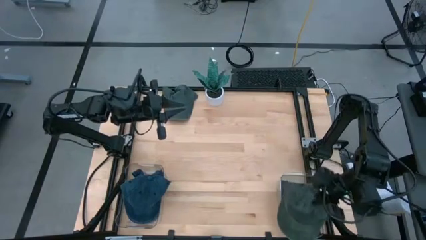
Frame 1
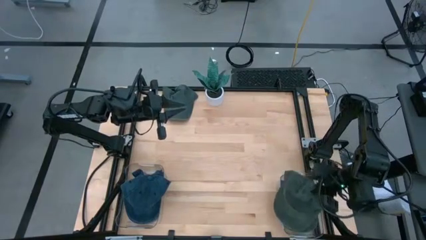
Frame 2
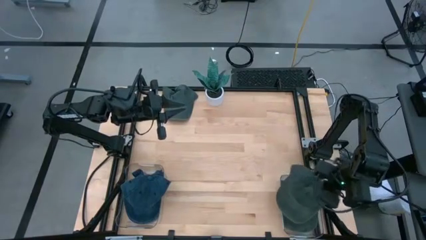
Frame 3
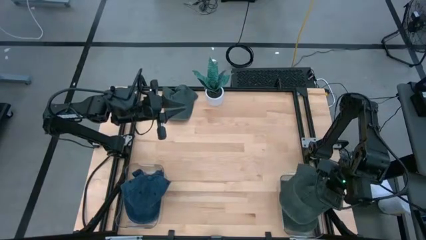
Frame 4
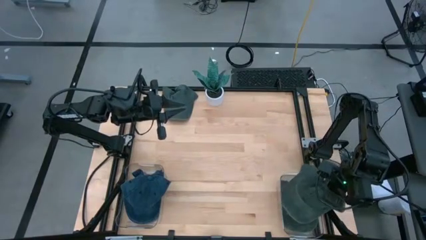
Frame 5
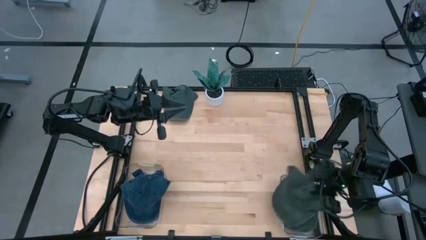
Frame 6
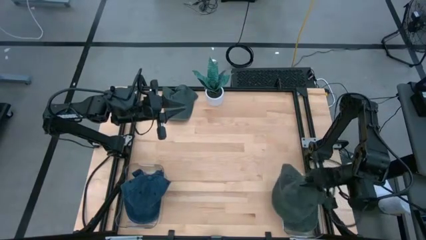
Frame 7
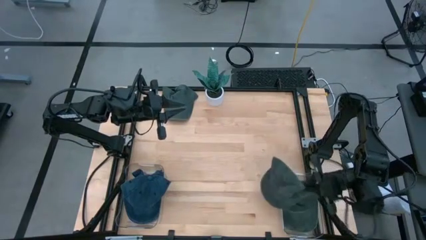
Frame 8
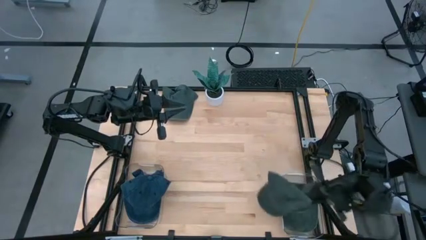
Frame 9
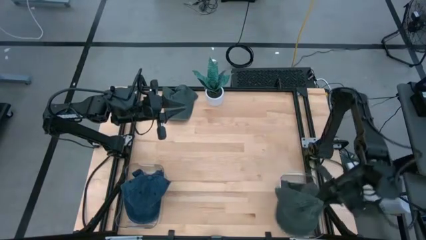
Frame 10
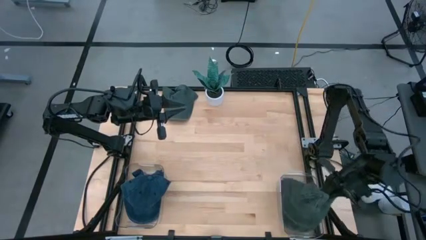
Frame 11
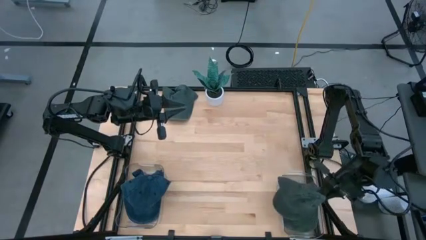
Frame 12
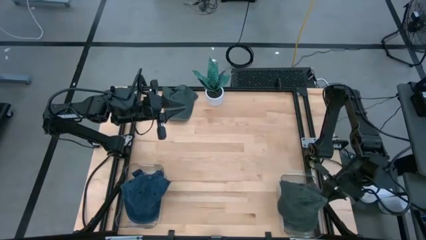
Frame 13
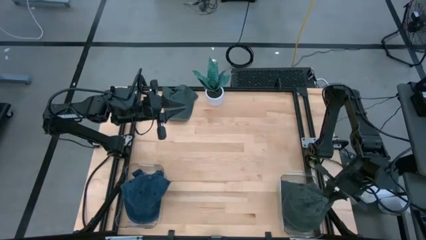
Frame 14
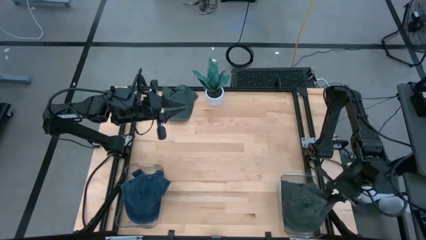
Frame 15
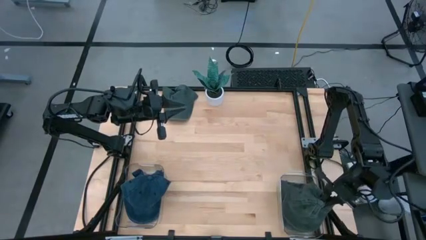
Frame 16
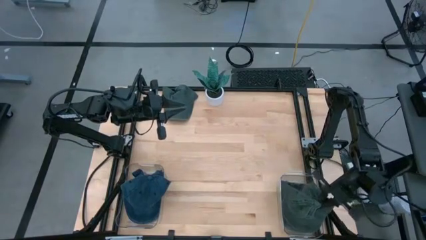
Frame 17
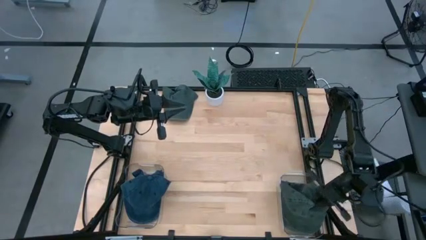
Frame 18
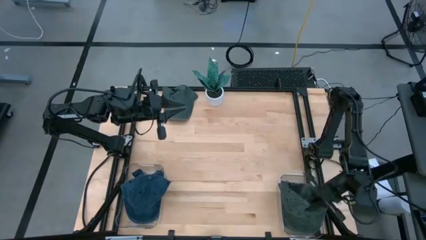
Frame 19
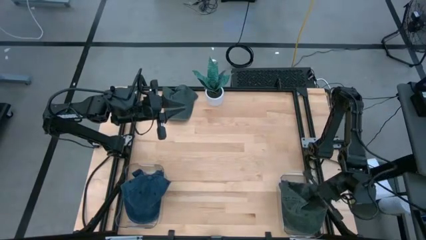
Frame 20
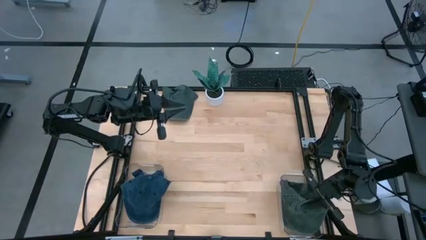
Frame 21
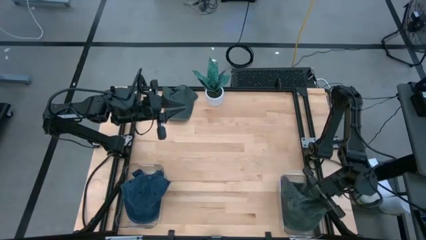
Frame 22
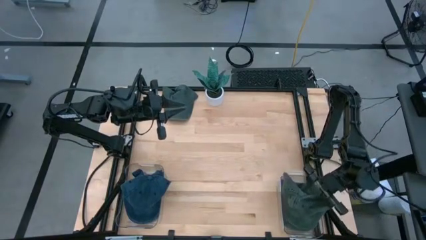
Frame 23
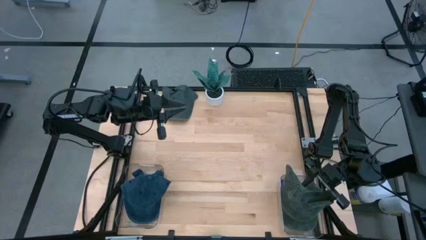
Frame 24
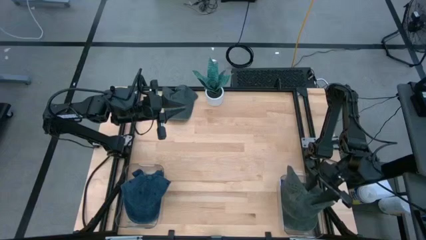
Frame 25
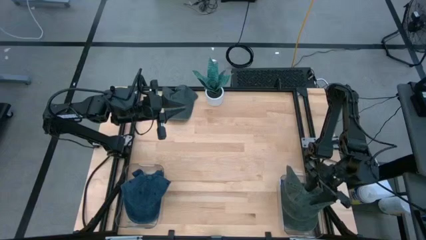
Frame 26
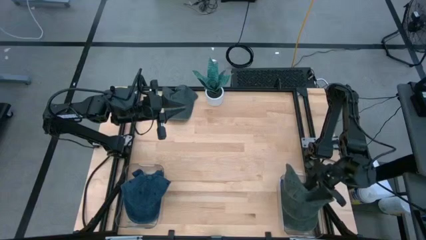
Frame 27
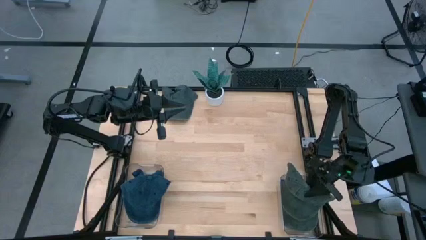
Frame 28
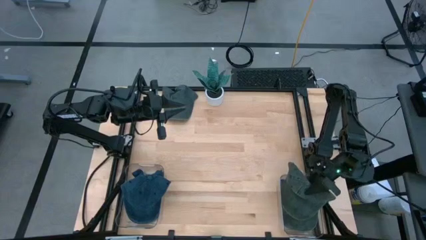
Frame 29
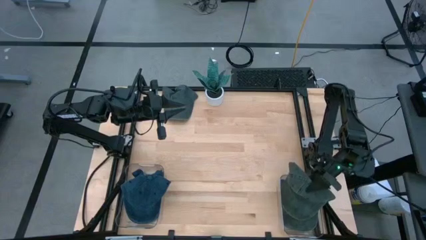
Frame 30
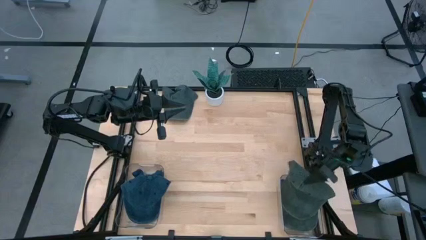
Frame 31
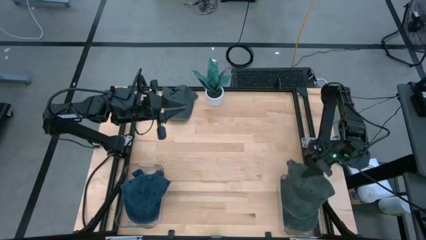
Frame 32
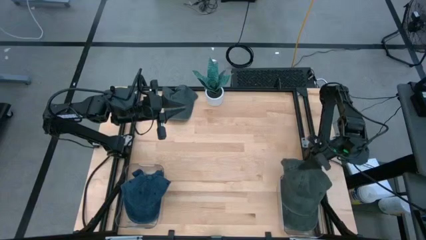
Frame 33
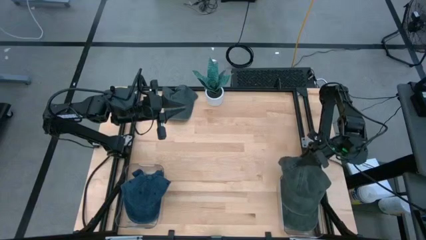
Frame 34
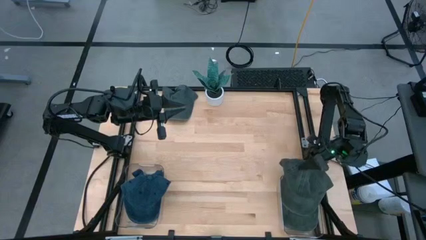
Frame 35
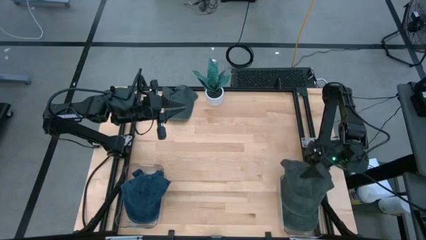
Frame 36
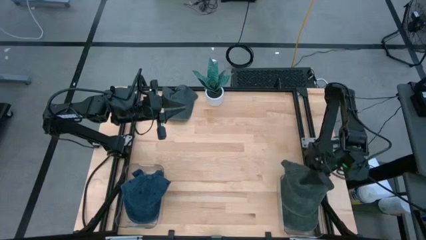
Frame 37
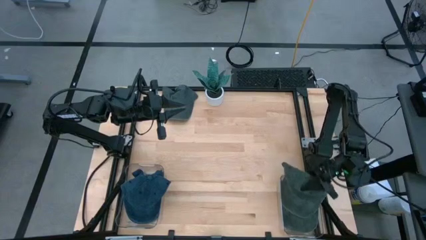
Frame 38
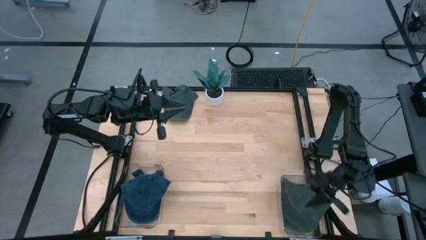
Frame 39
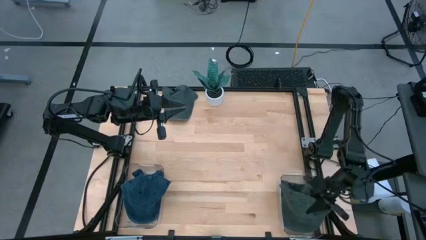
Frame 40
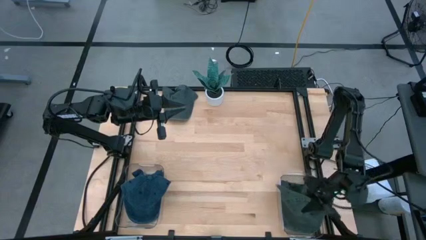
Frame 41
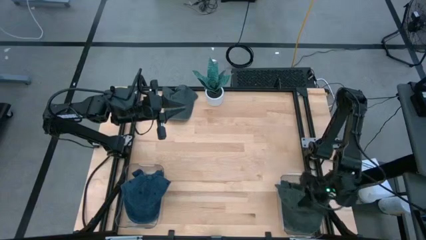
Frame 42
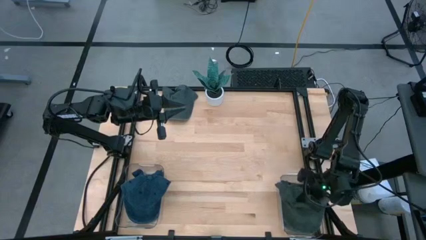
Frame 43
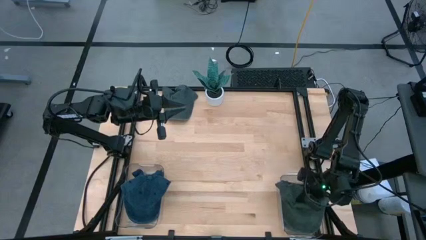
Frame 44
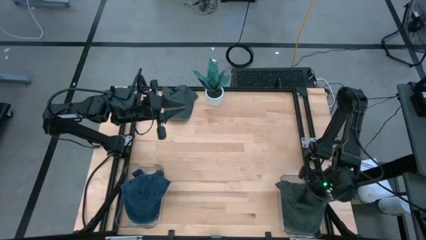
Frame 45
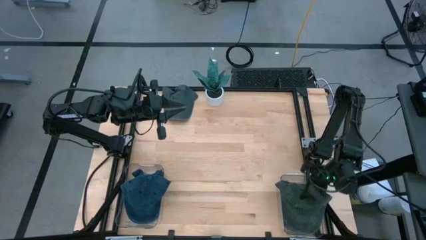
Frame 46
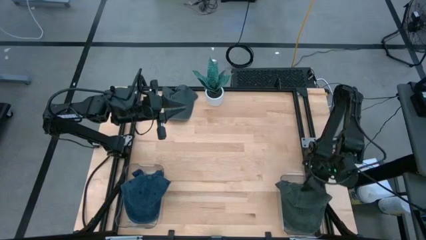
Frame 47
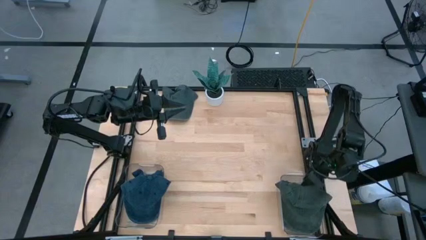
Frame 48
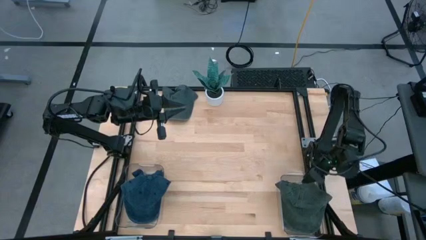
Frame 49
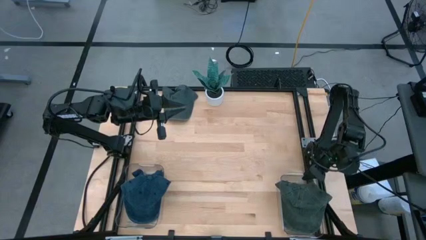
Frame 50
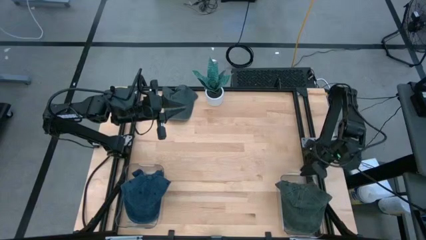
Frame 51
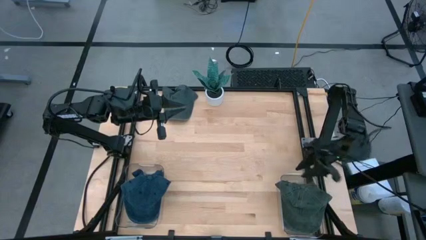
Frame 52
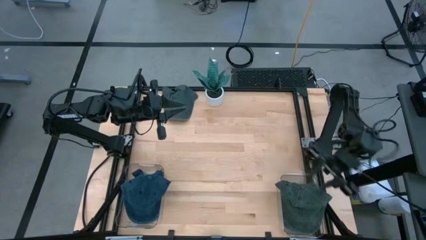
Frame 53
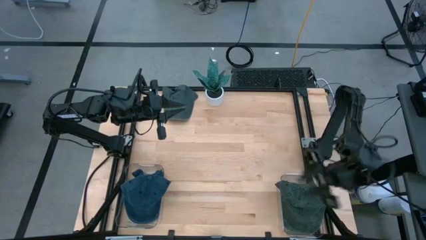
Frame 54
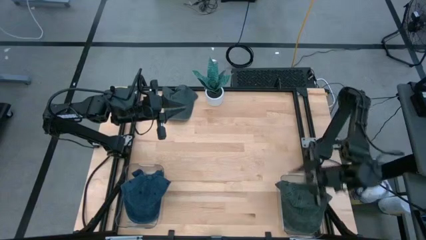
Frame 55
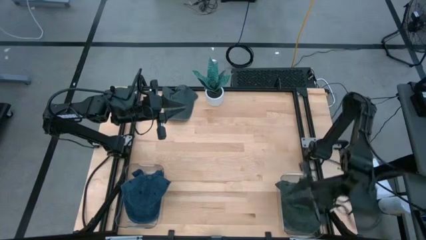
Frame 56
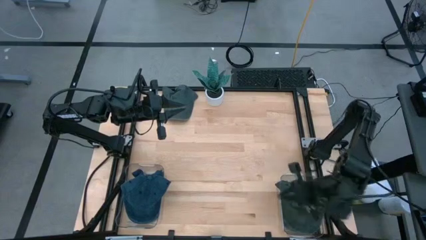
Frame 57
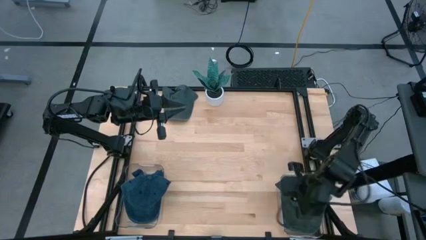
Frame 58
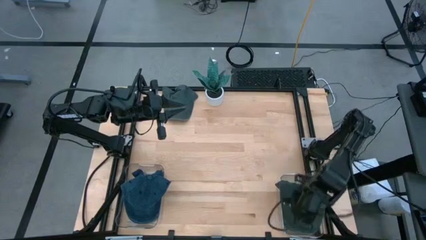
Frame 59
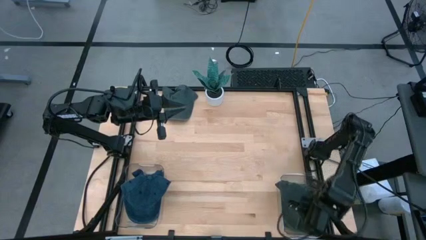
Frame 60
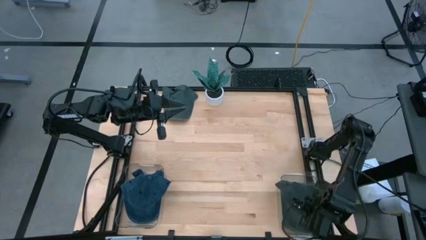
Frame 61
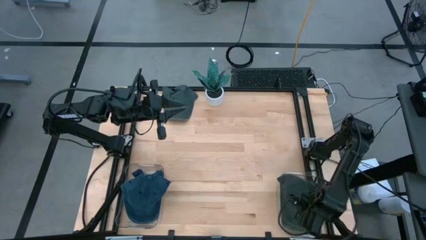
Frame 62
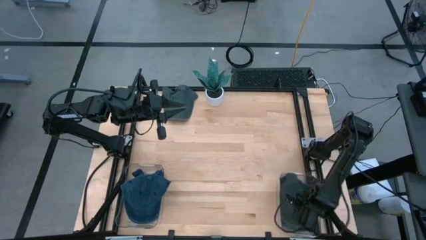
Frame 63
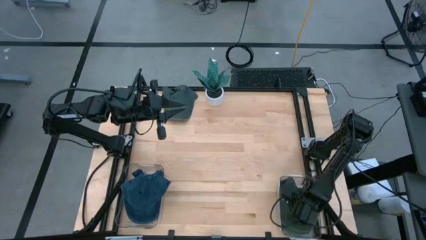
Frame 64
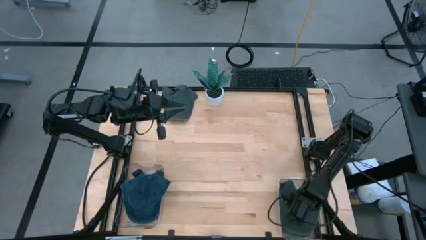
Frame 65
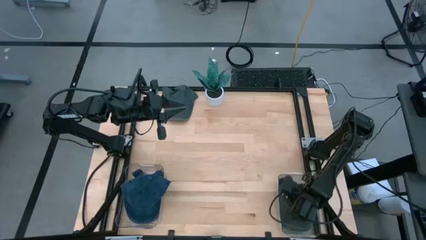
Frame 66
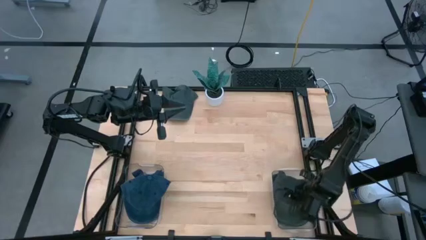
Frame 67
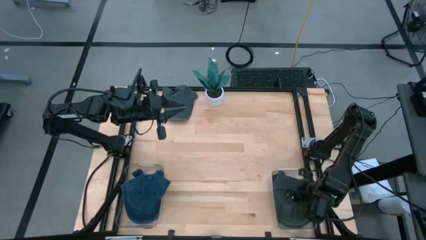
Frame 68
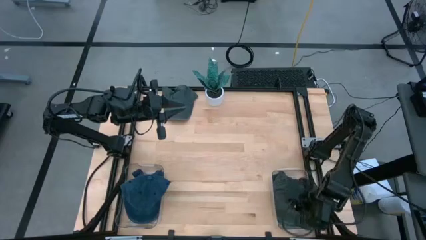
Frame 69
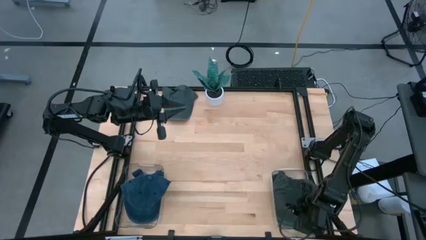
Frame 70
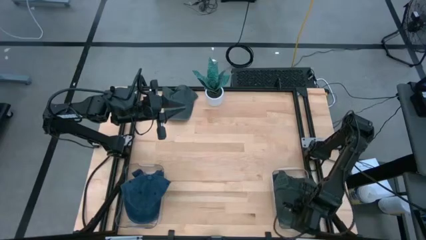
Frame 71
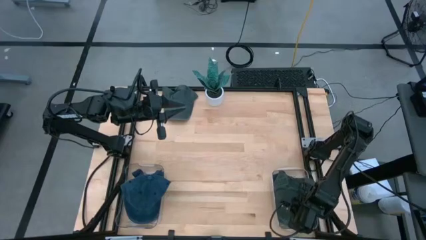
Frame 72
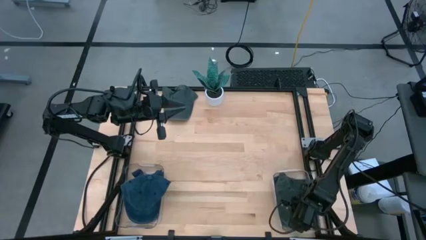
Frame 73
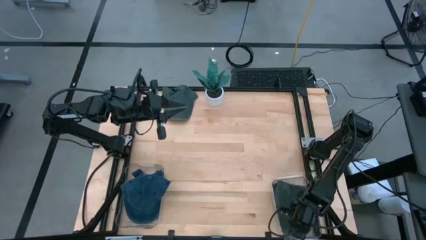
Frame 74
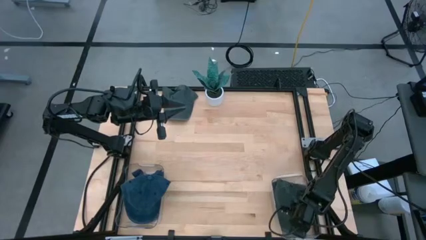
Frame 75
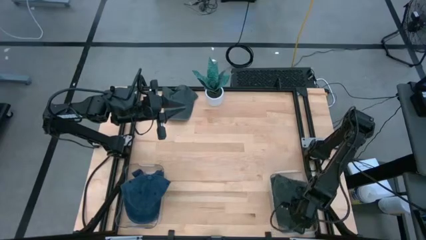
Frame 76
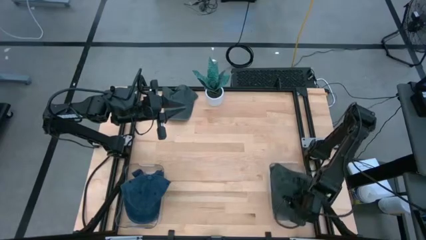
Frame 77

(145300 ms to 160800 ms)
Task: Pick & Place hat
Put the top gray cap into the right transparent bin

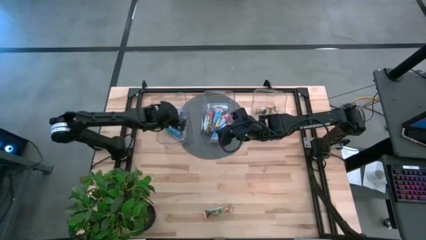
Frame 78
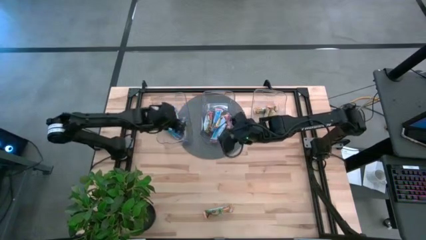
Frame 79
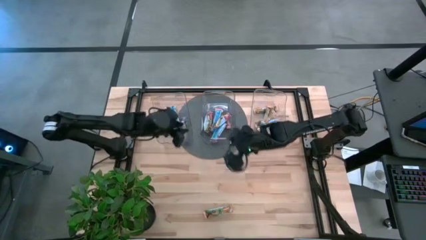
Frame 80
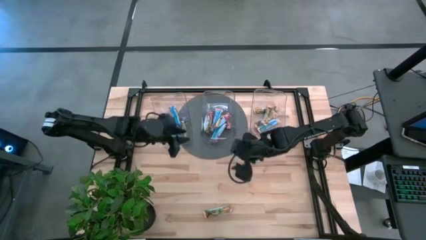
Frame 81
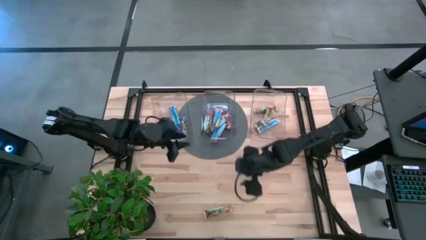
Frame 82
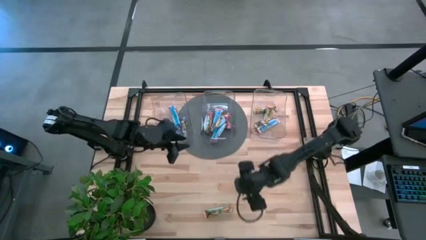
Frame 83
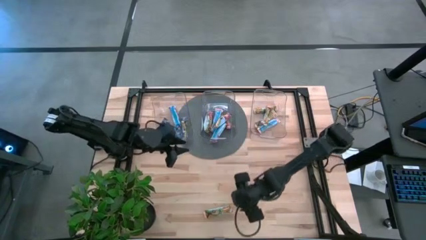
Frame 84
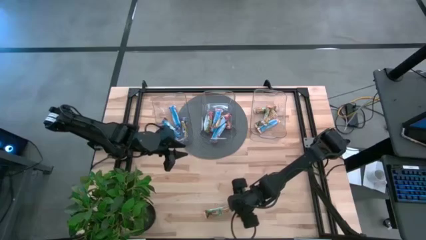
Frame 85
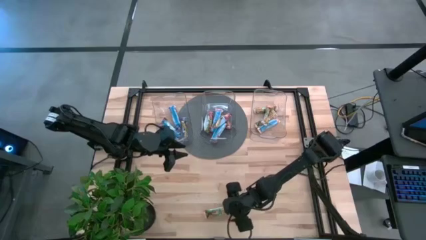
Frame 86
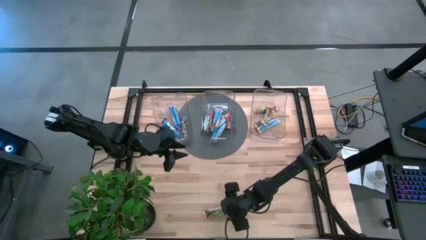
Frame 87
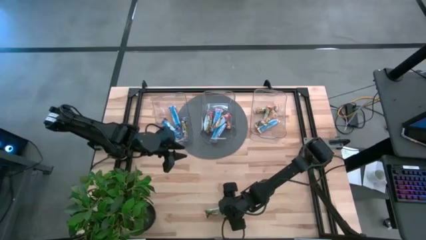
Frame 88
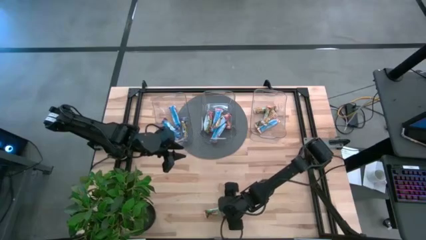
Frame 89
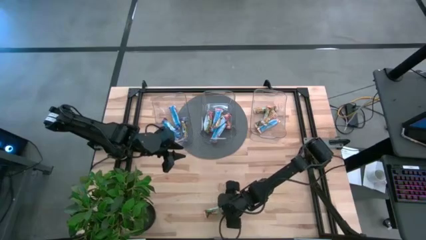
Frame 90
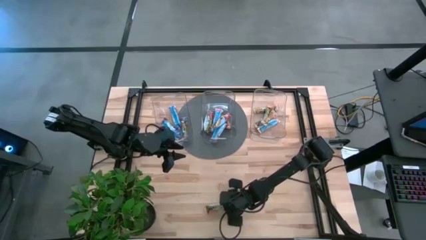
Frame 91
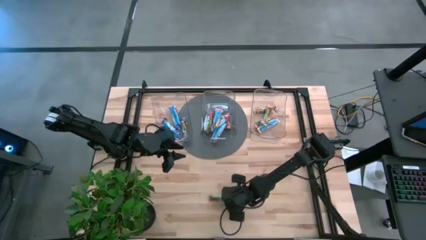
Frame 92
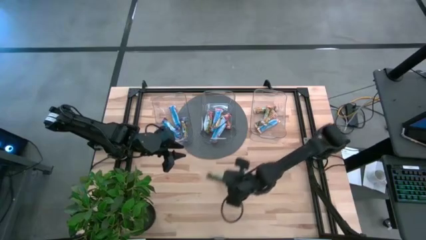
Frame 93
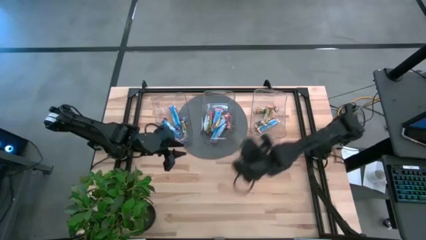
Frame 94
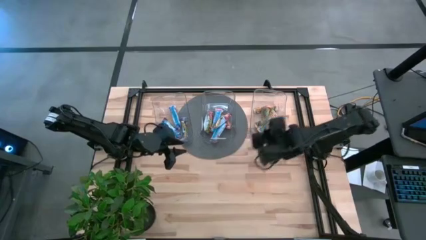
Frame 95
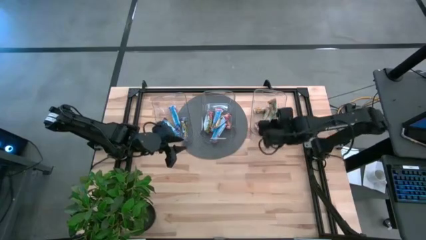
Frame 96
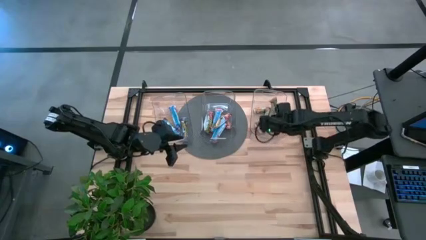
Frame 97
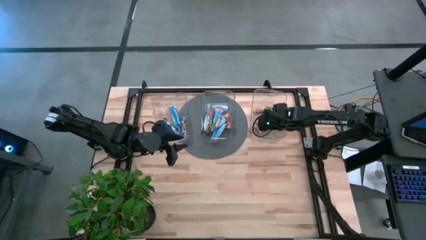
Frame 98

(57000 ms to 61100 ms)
Task: Pick and place Granola Bars by type
Put the yellow granola bar into the right transparent bin
